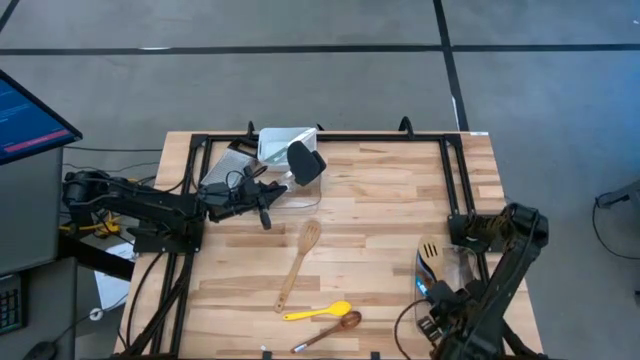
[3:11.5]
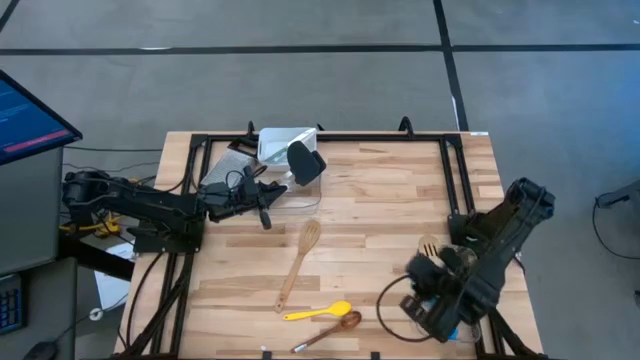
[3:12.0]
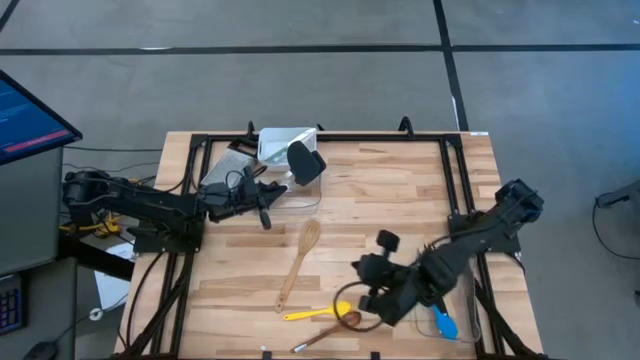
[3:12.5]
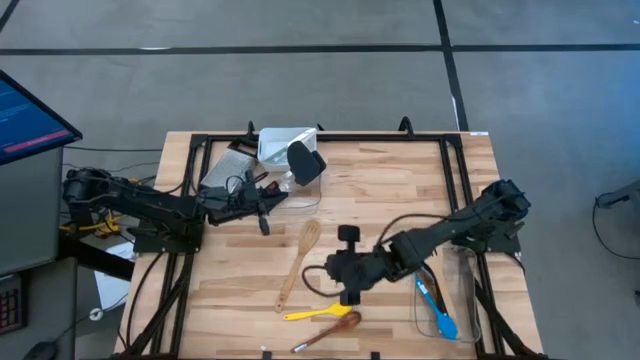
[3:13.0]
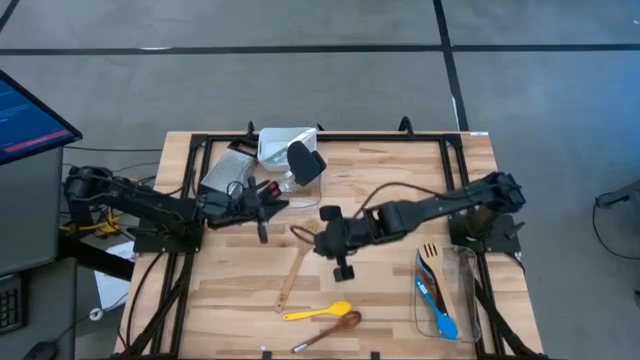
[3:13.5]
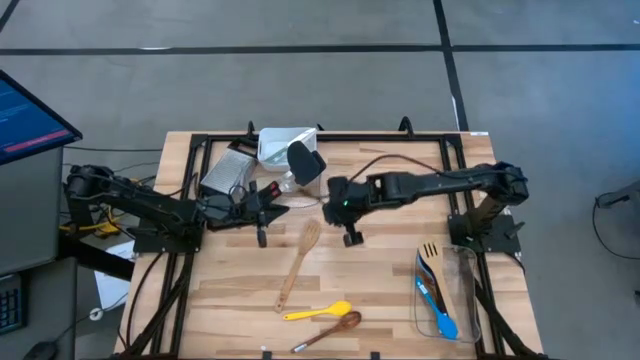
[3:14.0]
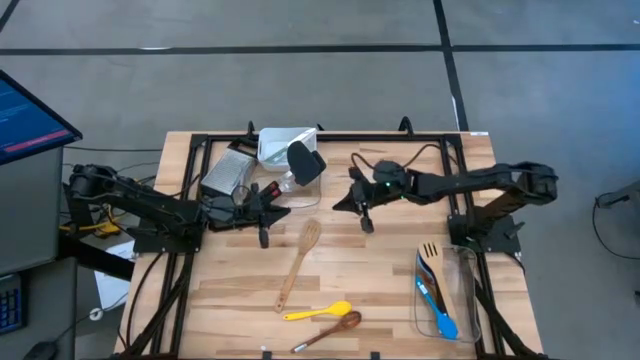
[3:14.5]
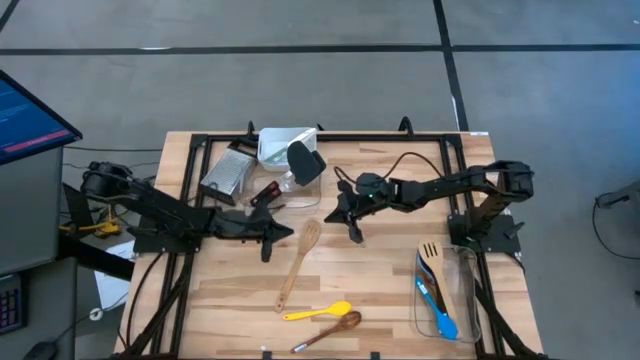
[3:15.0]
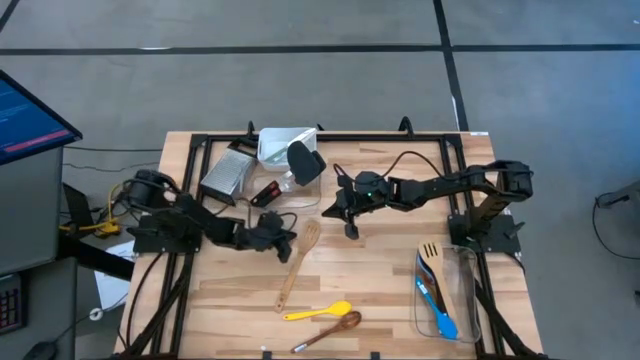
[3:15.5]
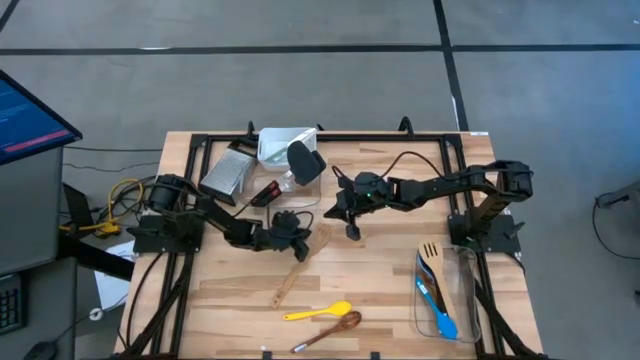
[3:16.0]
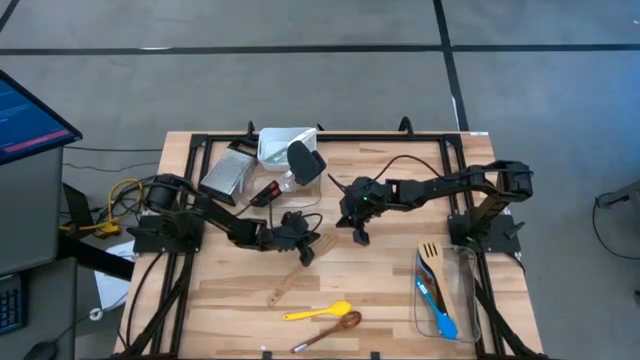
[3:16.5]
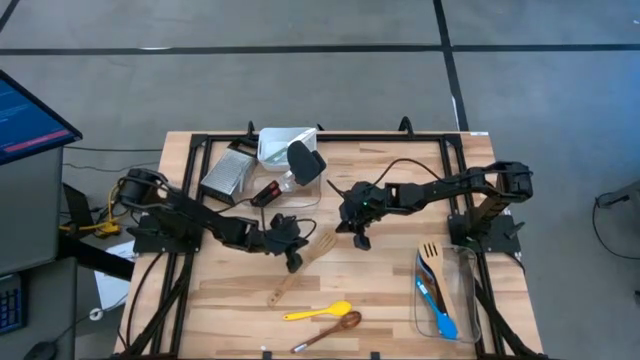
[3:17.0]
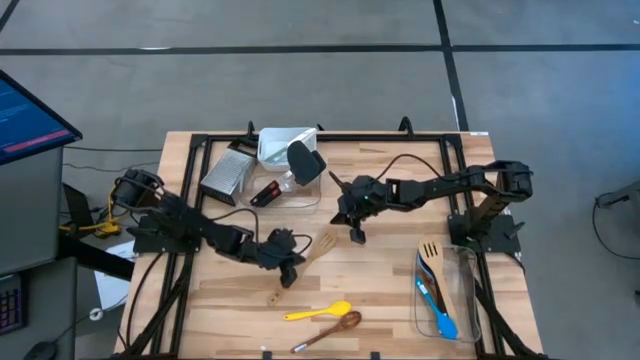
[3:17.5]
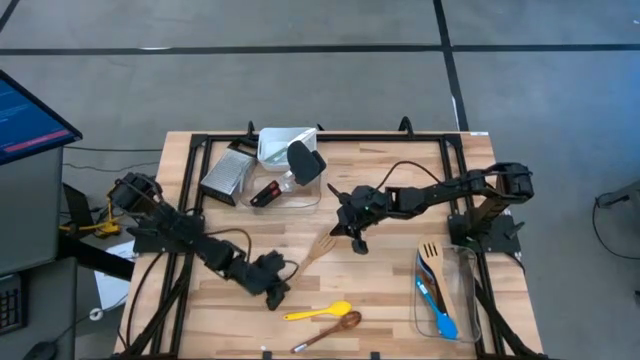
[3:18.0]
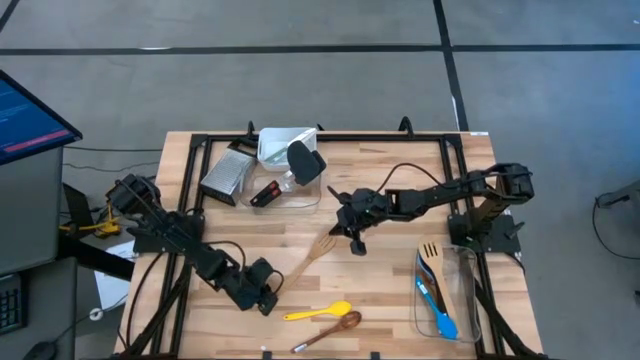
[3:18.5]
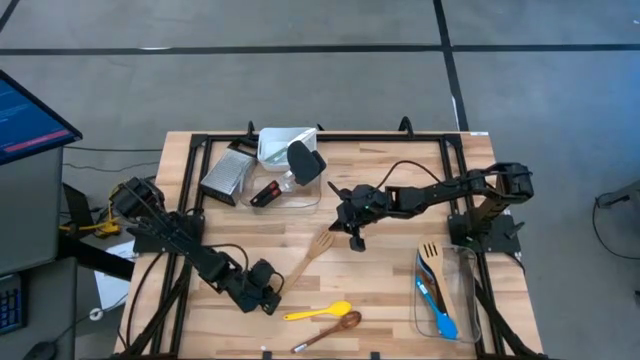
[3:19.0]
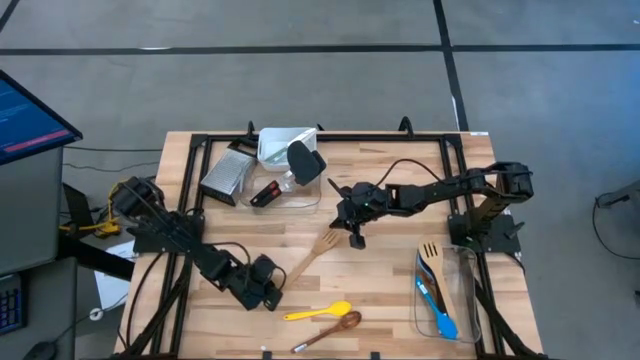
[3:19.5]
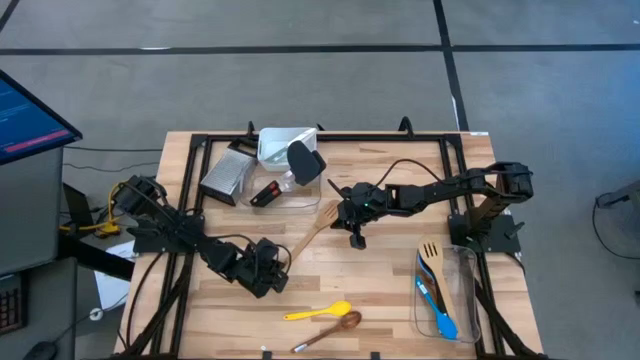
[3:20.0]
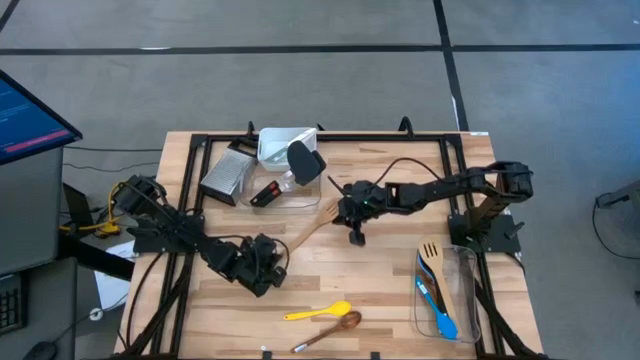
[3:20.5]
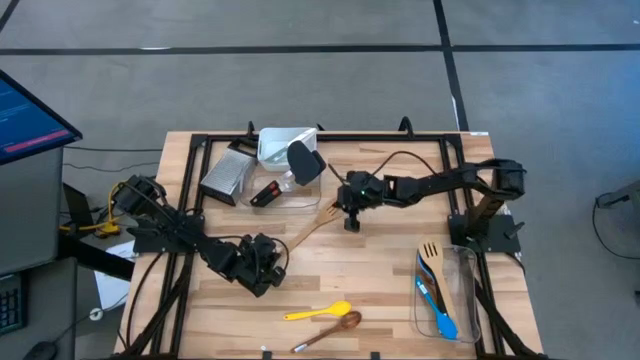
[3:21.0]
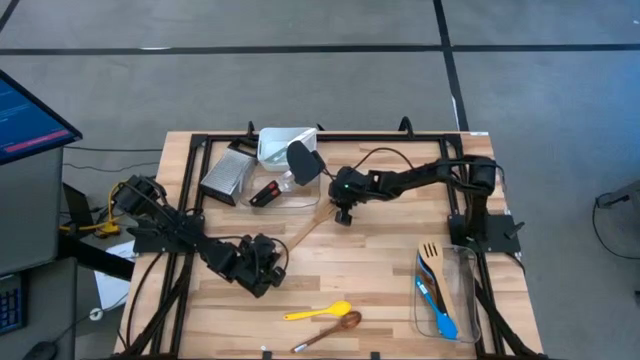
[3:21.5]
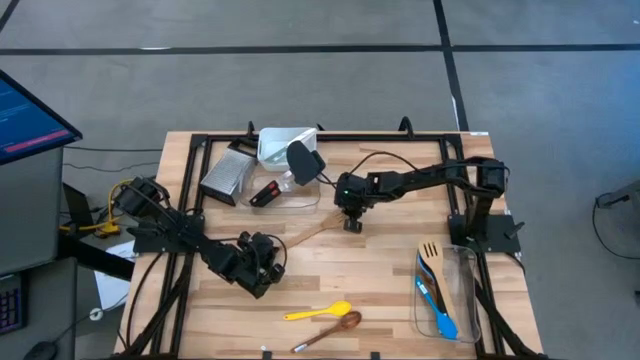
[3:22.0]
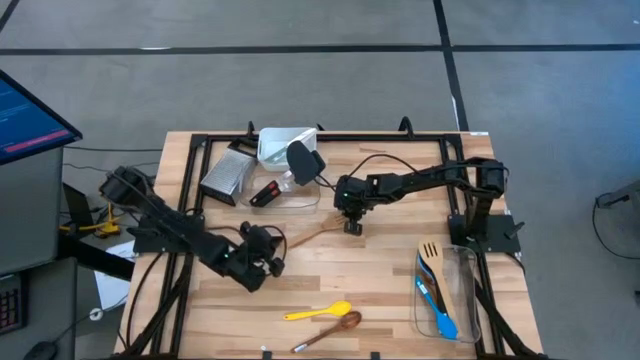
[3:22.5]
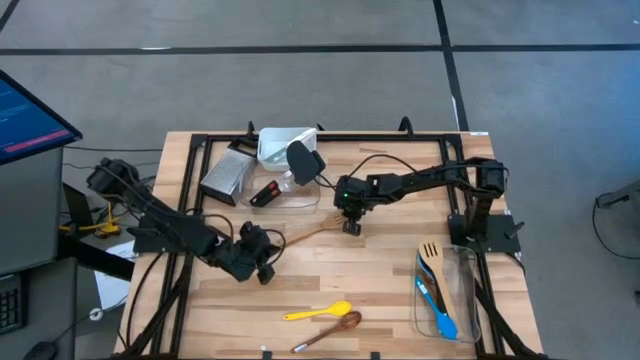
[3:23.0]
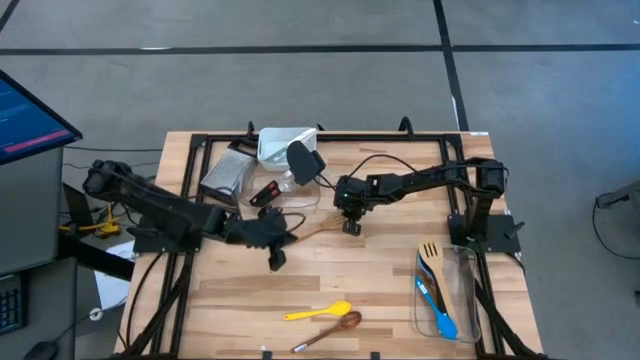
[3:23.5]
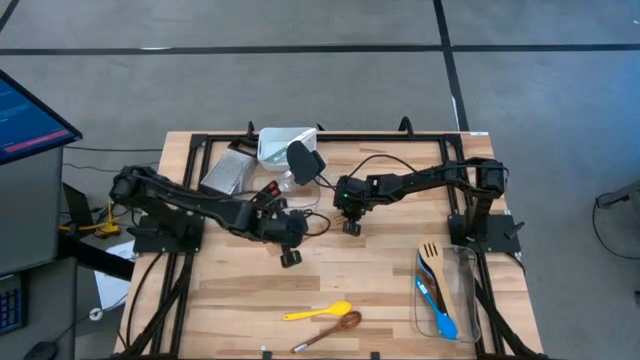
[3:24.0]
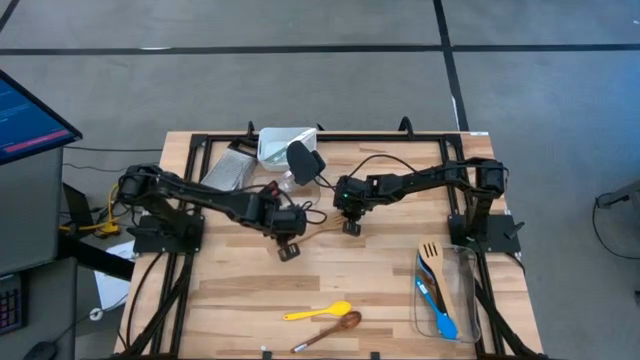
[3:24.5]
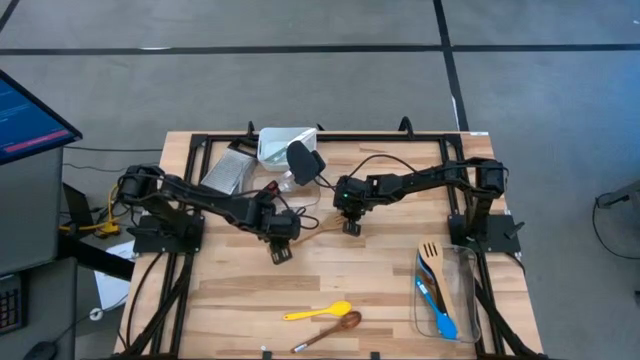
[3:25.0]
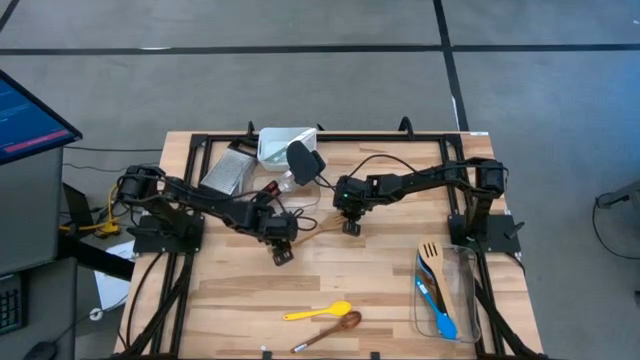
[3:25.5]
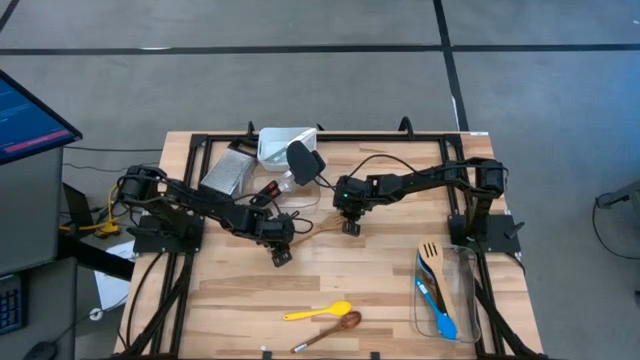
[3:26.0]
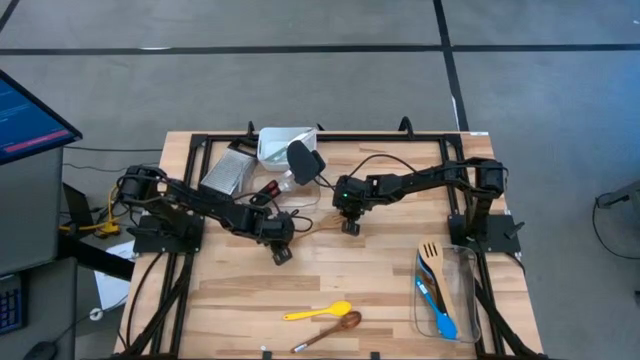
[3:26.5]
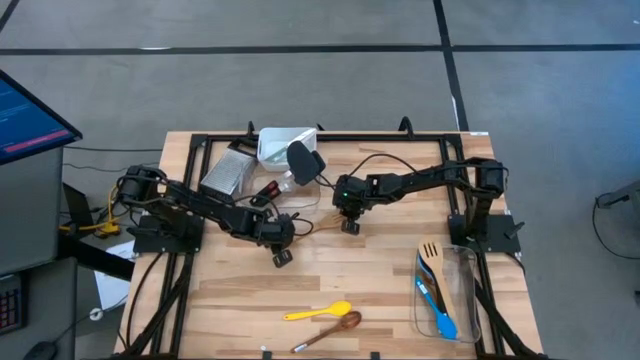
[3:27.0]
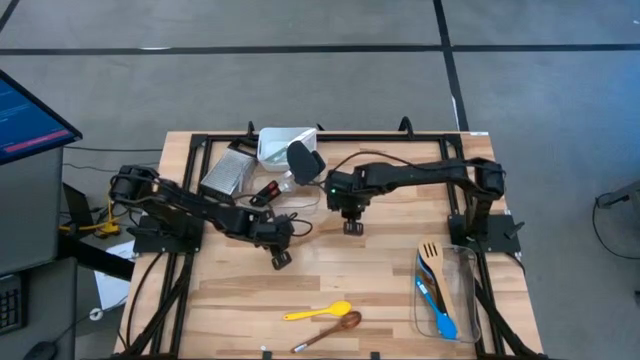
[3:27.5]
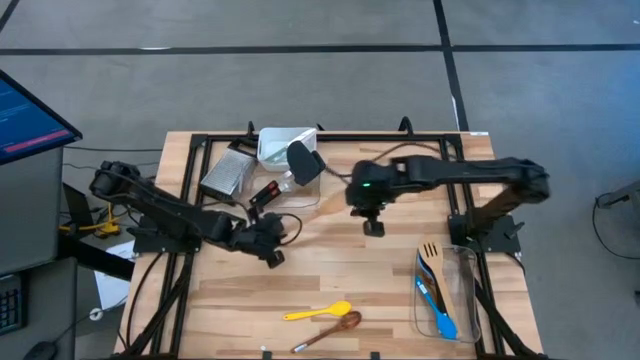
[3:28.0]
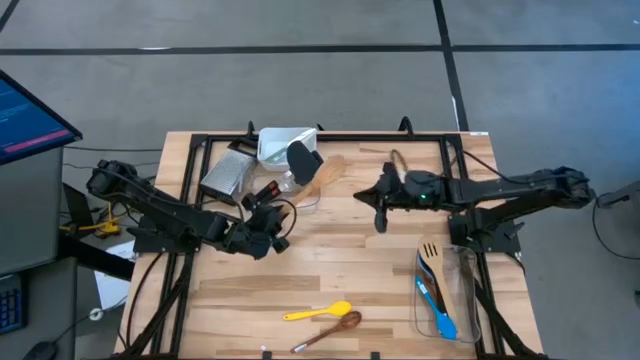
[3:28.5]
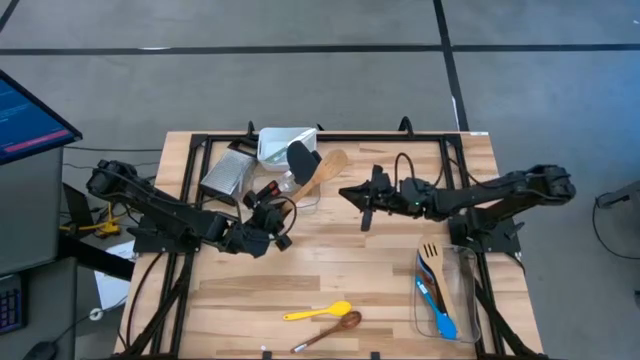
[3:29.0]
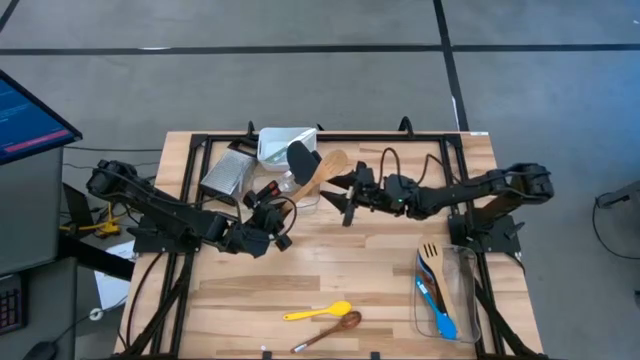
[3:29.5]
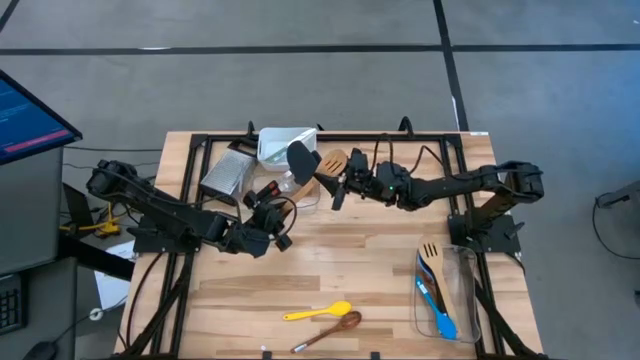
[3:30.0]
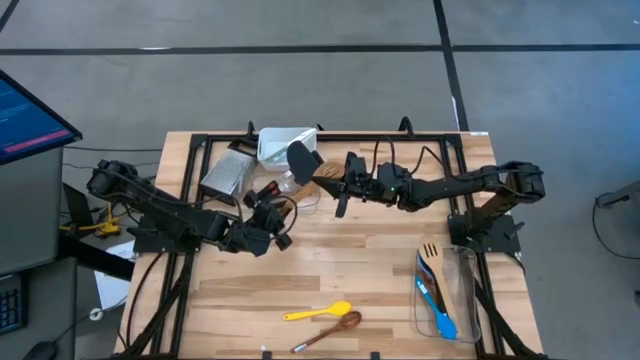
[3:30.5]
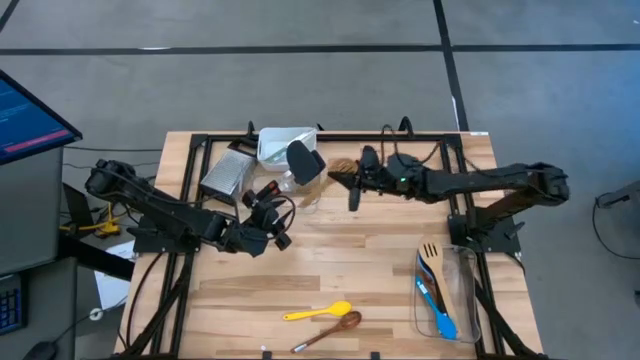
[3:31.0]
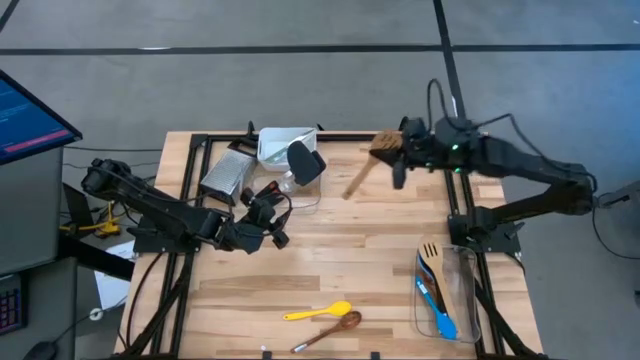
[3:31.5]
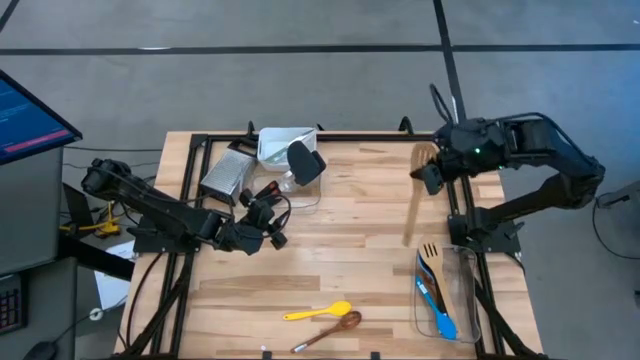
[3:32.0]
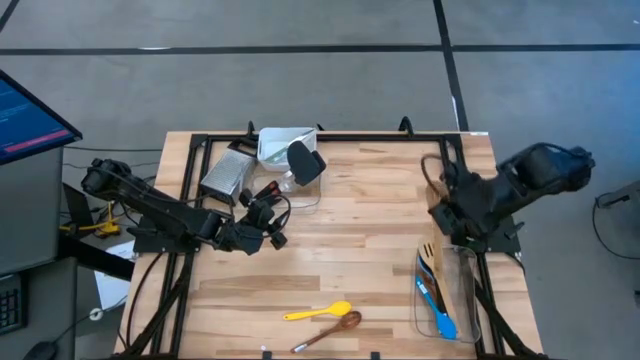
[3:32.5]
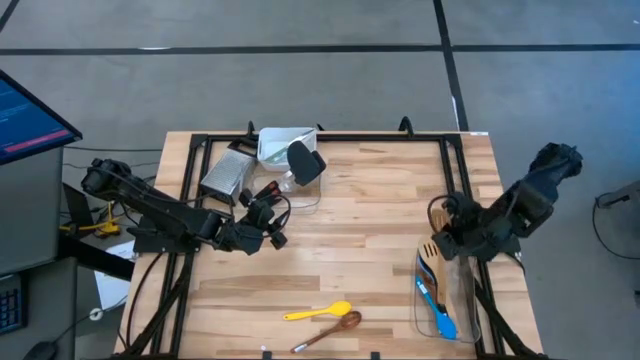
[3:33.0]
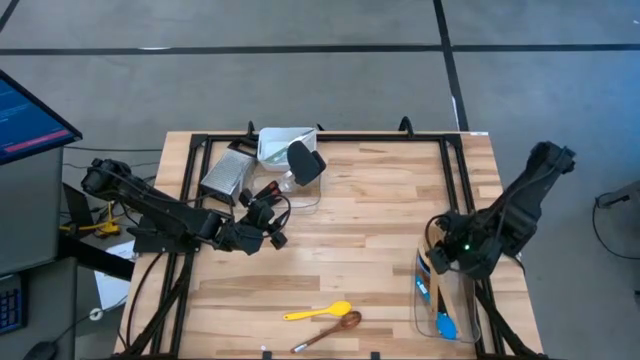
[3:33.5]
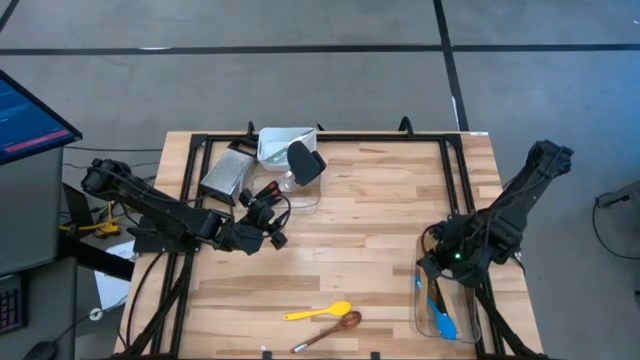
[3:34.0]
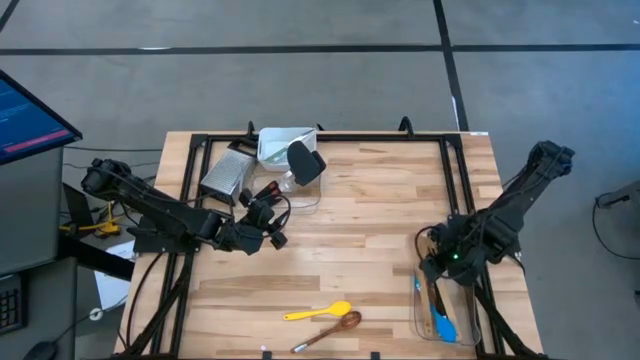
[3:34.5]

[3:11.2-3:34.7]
Task: Pick & Place Kitchen Items
Put the wooden slotted spatula into the bottom transparent bin
